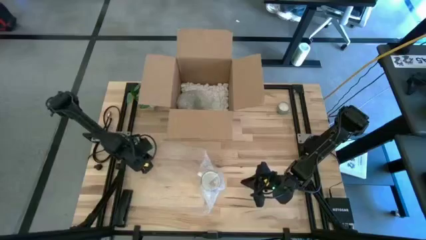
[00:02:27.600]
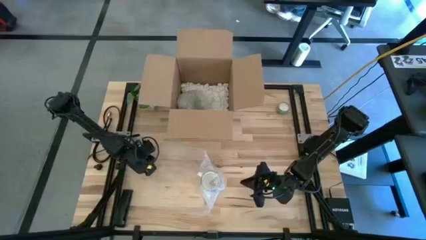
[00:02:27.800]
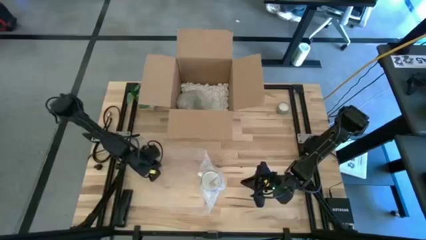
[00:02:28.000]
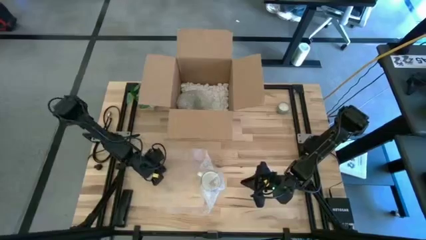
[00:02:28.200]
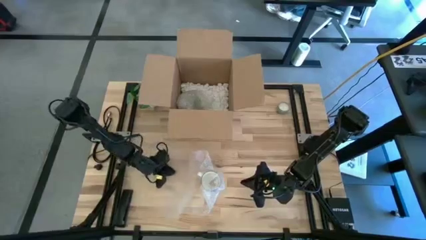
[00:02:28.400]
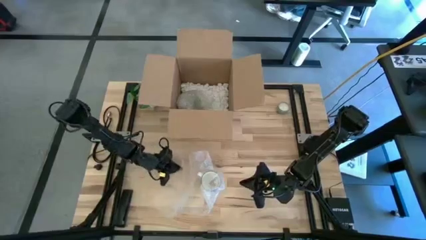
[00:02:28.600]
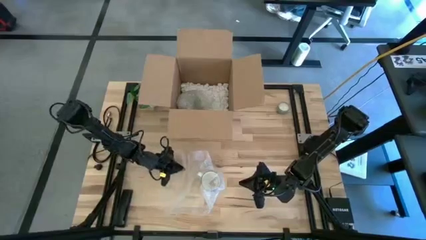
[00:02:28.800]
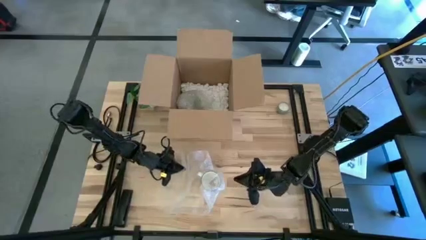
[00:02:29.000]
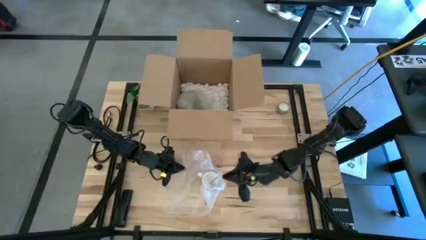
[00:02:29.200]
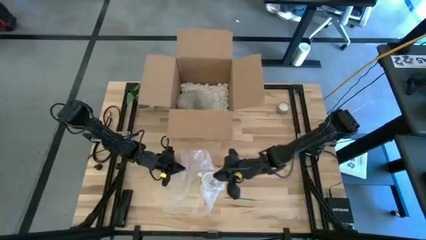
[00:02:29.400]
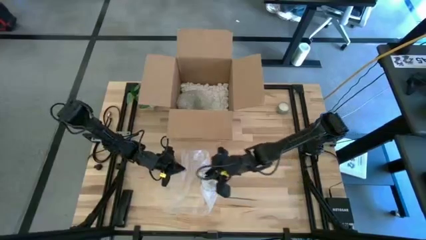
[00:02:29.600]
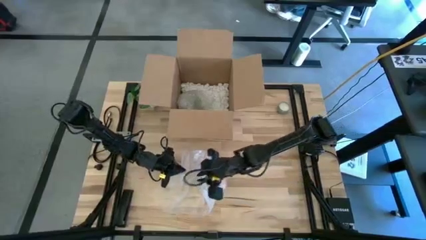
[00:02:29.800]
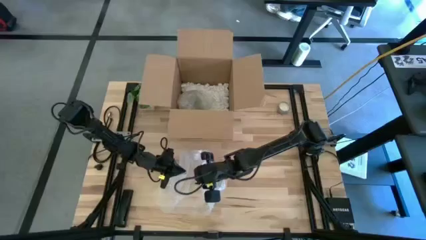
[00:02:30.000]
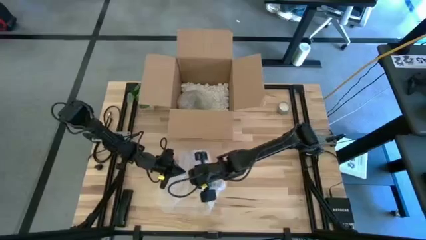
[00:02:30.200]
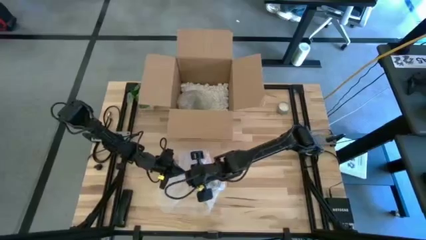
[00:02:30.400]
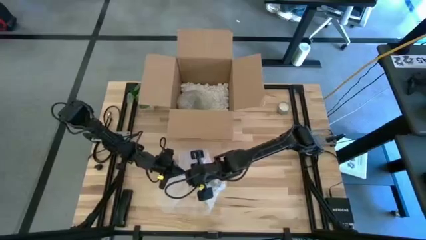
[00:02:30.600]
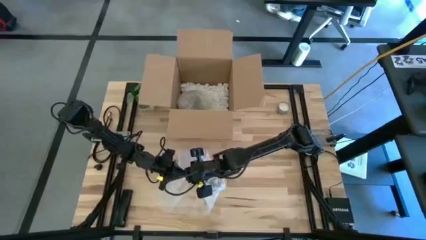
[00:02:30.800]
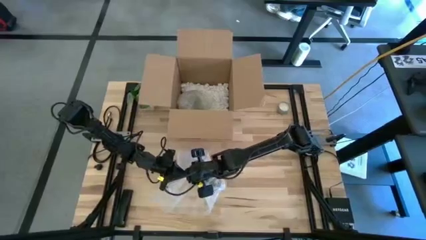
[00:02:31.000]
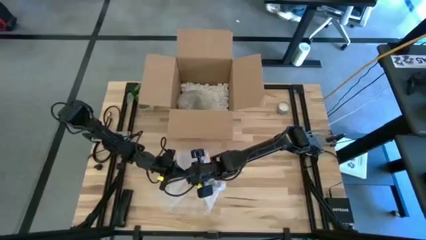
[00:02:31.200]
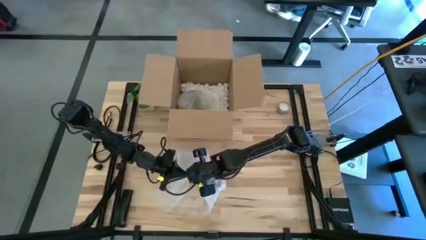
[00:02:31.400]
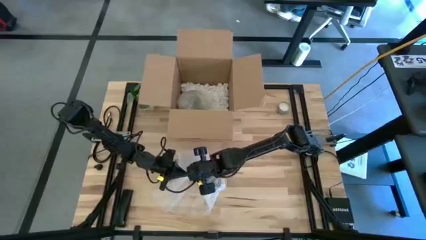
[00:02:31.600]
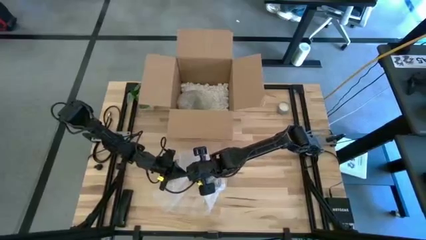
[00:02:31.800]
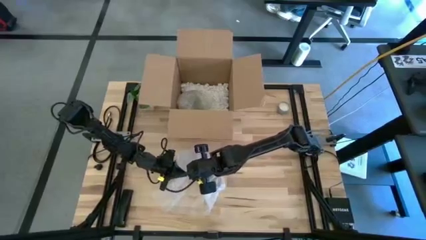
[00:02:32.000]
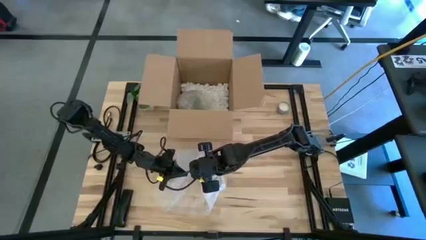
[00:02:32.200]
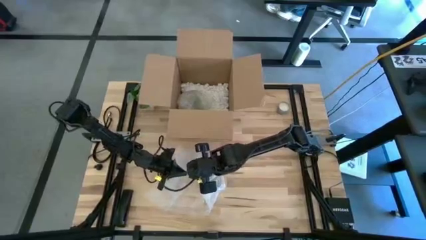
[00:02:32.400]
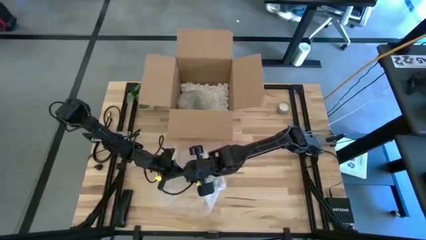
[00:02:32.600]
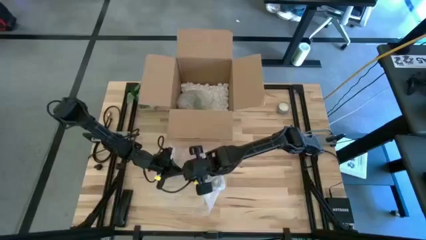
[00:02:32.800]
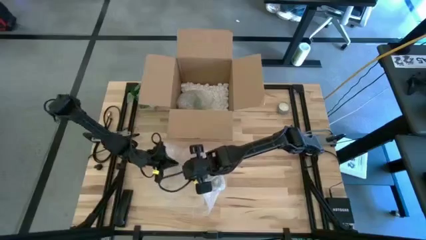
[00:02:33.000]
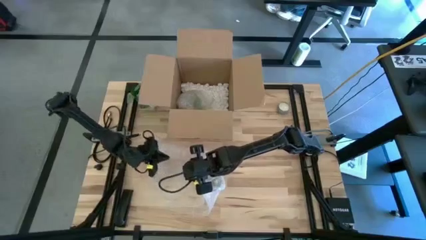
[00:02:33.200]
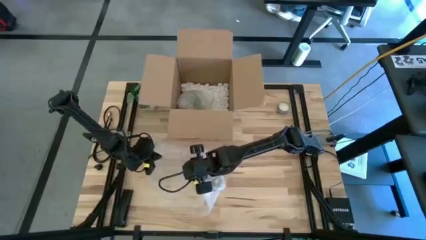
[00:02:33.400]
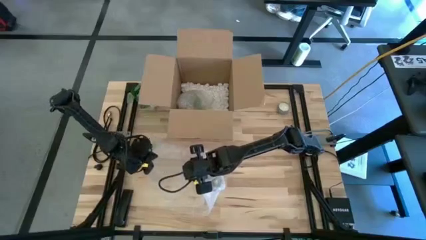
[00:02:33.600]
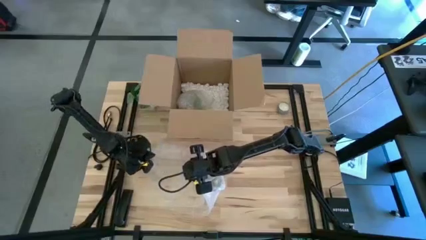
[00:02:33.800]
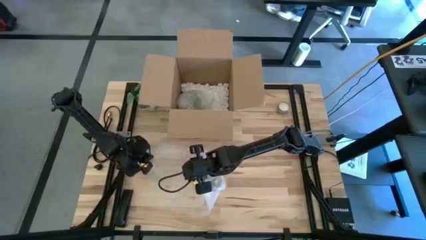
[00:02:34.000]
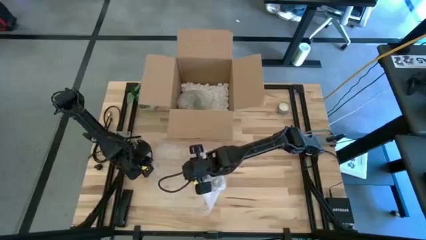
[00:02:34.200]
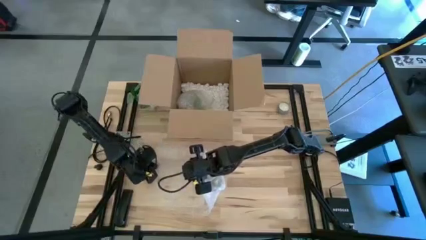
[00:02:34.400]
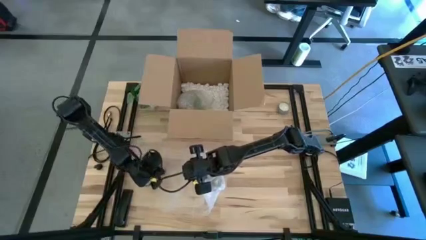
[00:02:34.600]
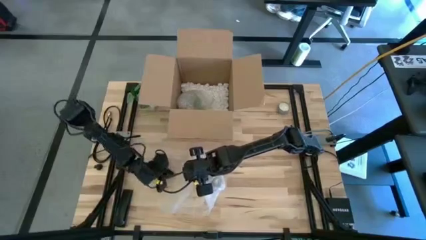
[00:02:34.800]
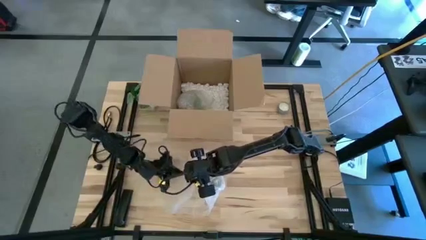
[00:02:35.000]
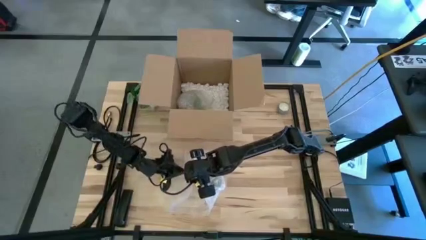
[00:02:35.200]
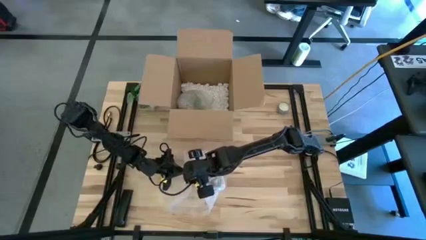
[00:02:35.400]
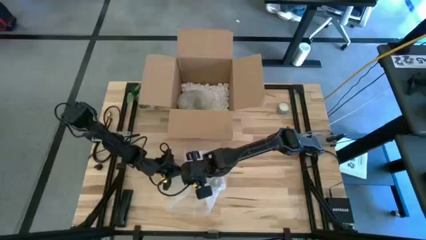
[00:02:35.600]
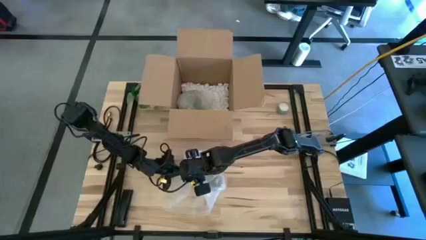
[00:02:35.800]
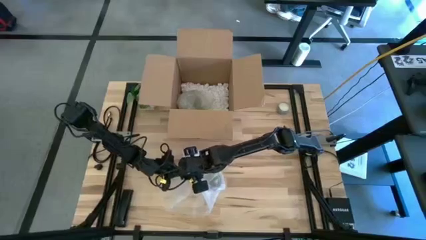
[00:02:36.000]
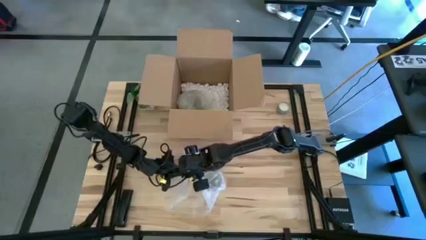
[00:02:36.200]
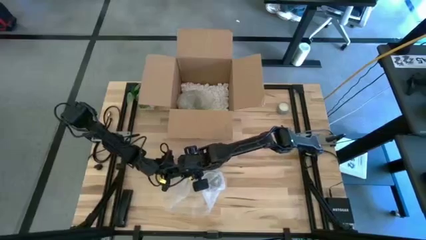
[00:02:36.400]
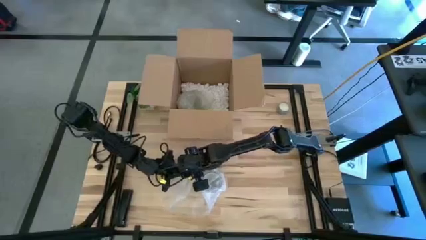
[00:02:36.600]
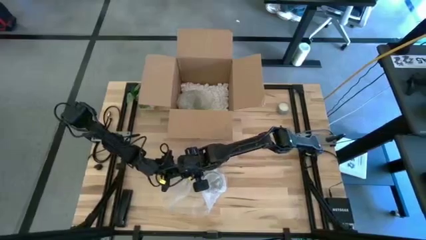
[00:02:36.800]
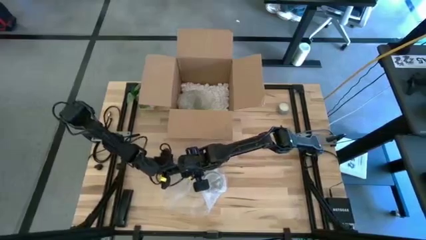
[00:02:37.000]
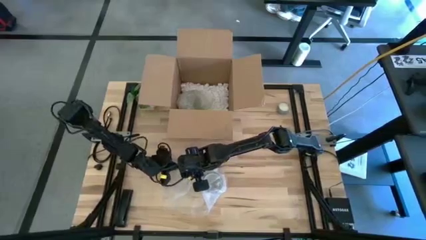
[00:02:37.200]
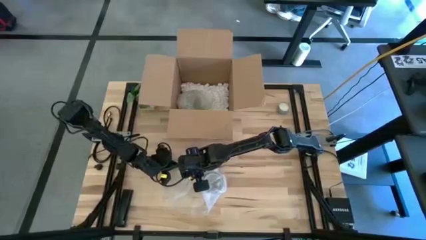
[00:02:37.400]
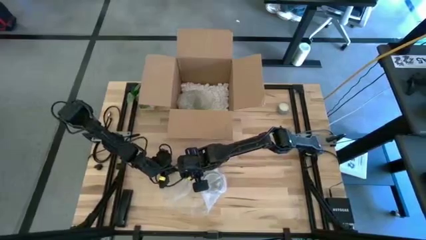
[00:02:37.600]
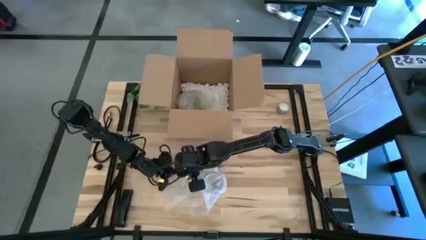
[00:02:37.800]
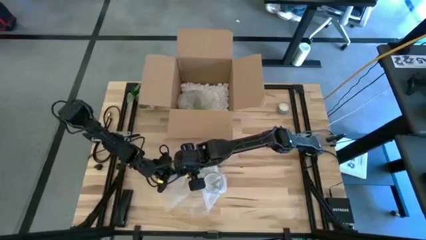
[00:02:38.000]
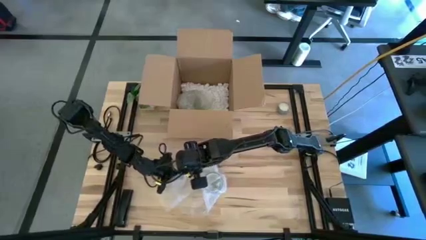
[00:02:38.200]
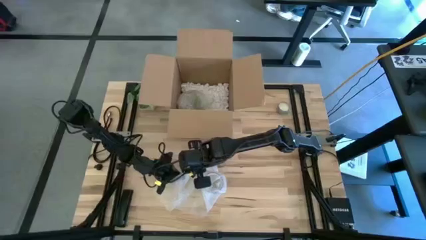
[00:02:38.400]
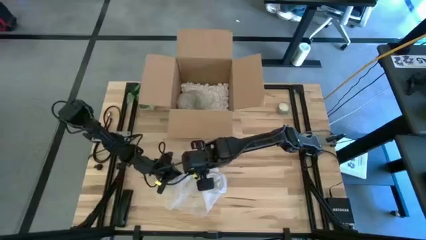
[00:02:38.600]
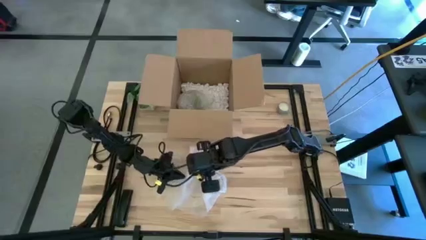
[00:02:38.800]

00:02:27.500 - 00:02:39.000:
Task: wrap mug
Wrap the blue mug with the bubble wrap

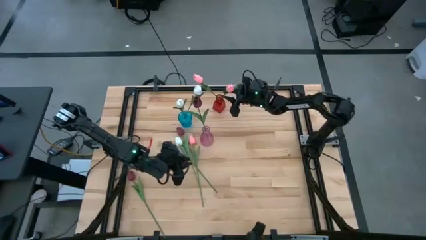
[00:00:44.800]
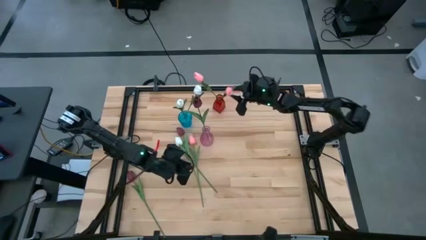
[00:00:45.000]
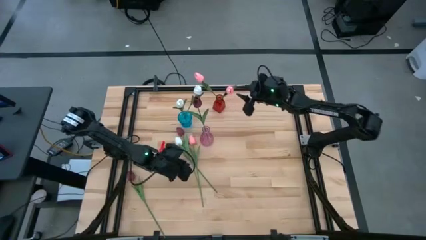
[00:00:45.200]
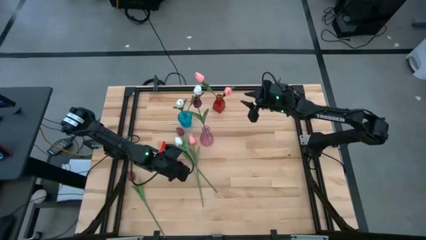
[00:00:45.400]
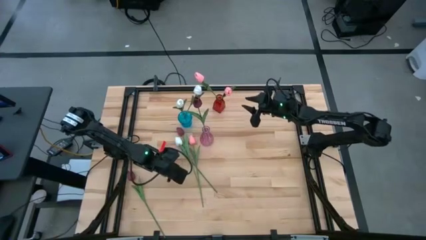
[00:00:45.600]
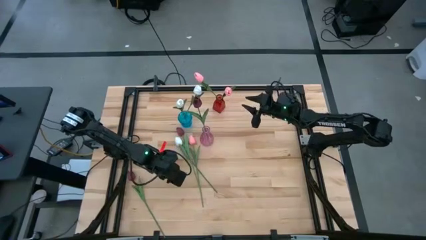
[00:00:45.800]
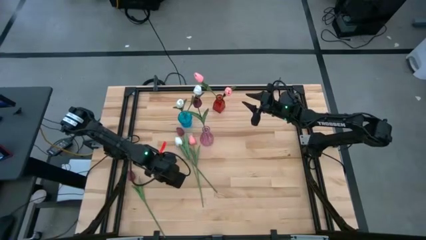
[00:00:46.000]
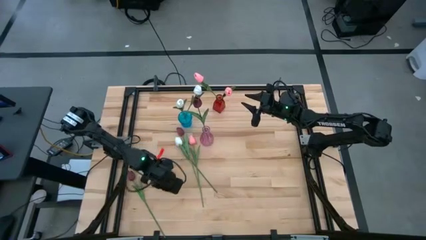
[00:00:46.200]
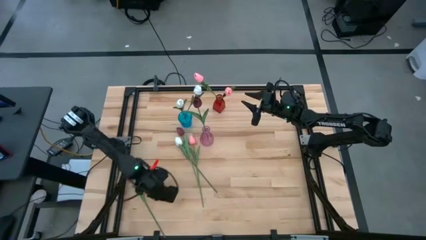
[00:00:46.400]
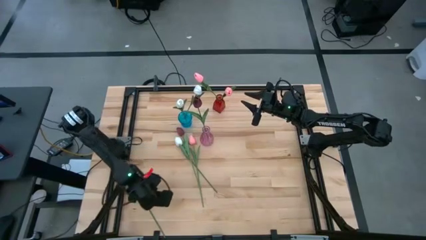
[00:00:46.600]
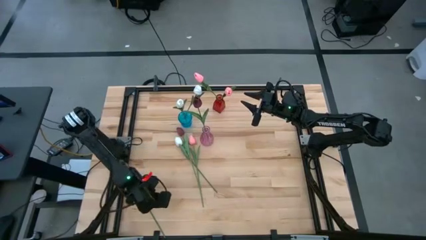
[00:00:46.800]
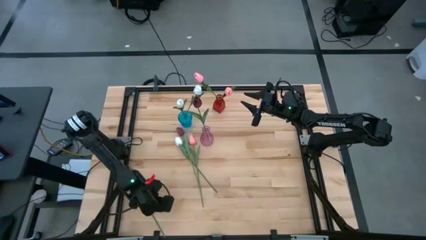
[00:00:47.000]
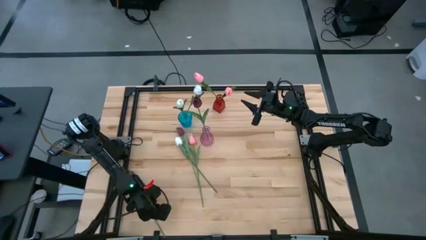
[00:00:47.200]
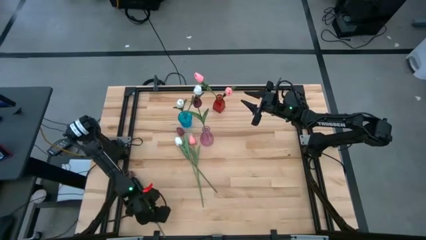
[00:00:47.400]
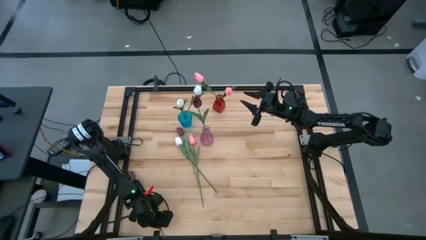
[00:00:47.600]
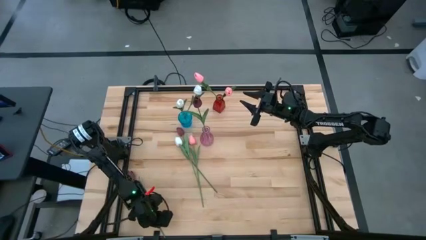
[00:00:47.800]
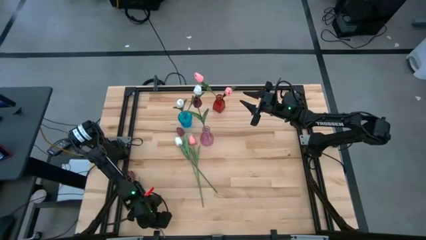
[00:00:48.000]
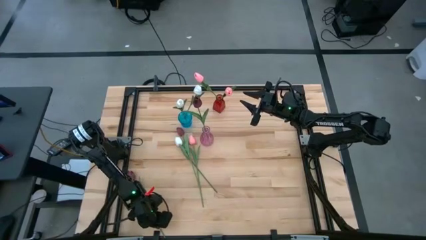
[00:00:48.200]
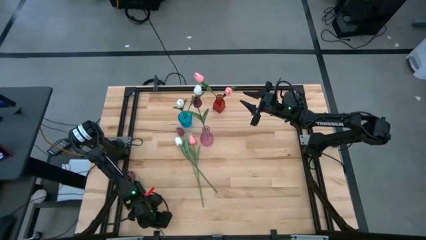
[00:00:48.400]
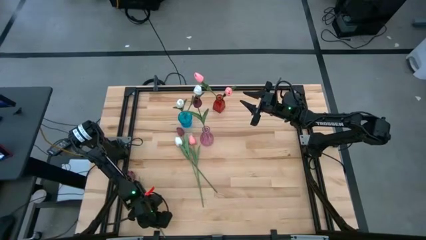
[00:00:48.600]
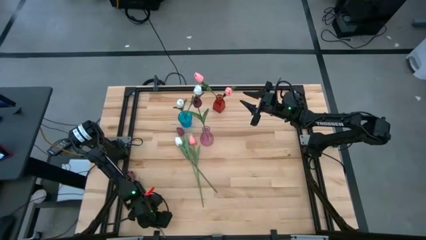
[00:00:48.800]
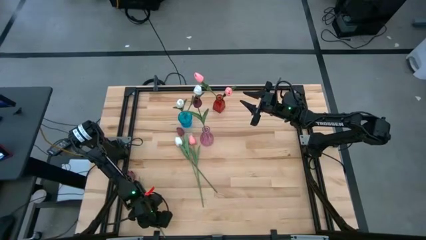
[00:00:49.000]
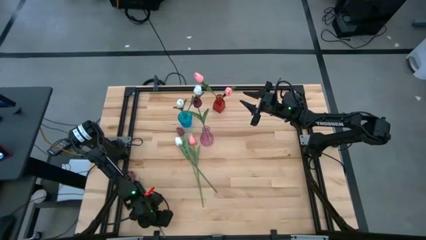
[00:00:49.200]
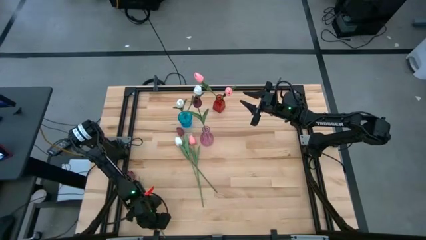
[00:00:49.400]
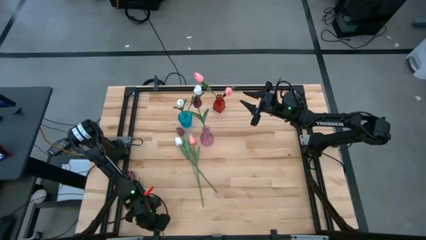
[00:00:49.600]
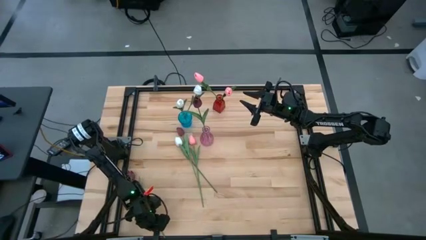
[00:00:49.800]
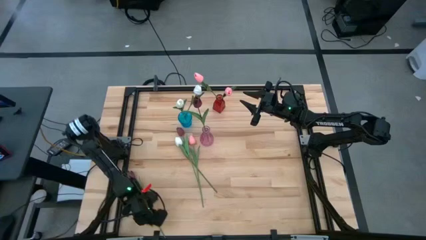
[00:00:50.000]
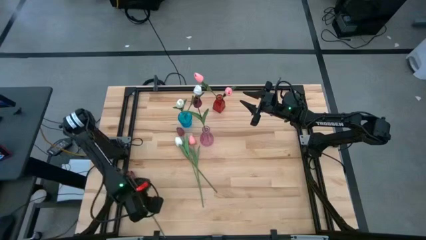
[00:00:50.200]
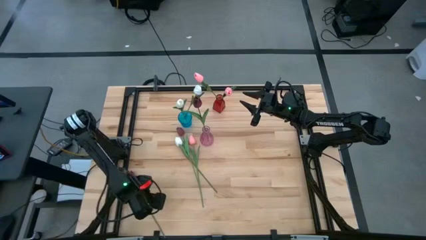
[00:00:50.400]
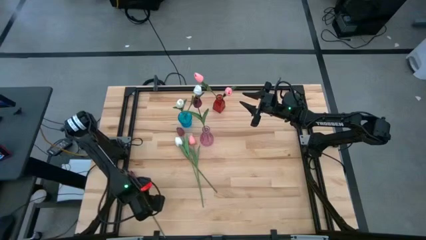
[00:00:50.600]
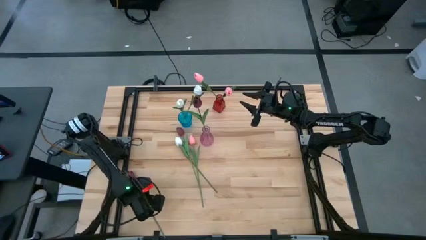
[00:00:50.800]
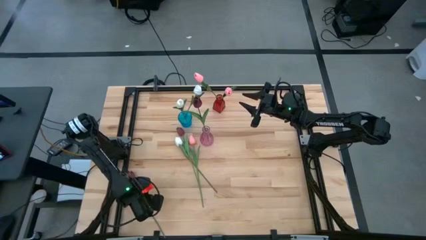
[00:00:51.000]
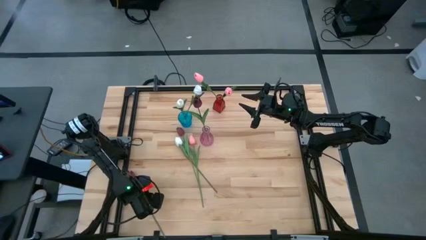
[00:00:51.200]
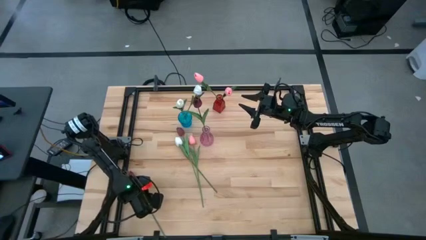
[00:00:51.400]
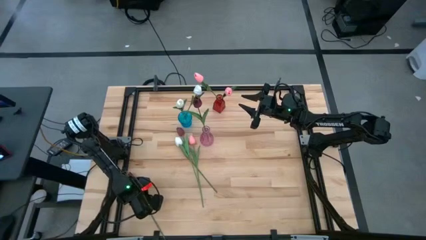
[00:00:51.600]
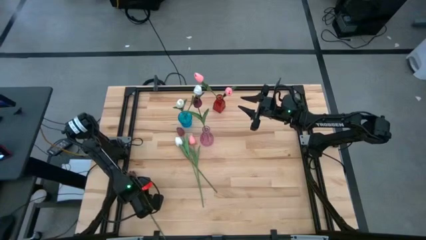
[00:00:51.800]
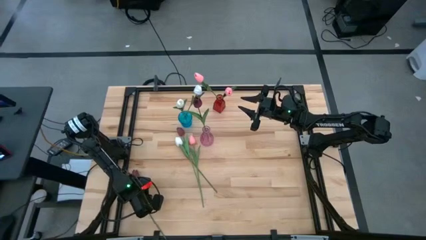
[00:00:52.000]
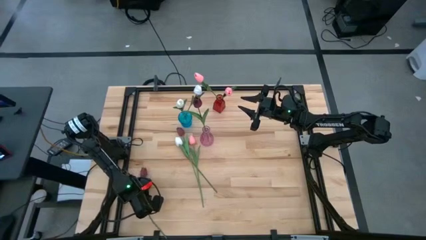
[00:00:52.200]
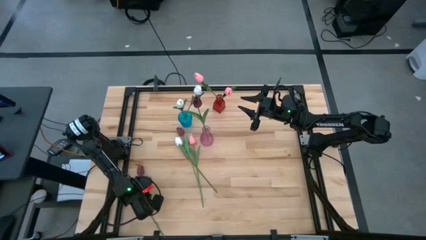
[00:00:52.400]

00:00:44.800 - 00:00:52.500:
Task: Sort flowers into vase by color
Put the bottom dark red flower into the pink vase
